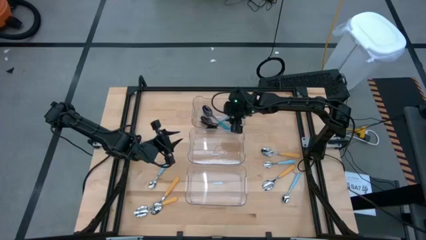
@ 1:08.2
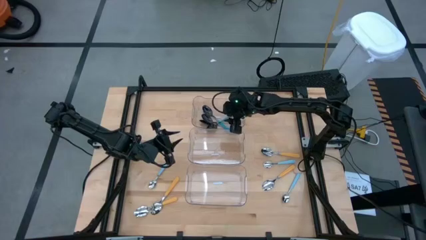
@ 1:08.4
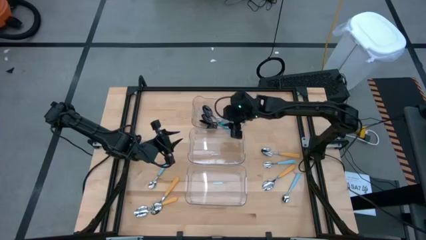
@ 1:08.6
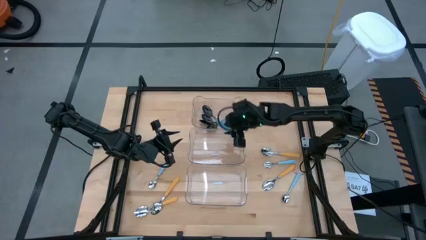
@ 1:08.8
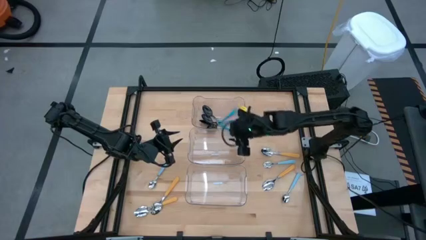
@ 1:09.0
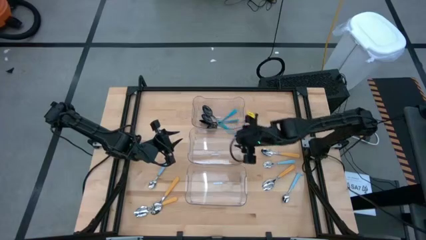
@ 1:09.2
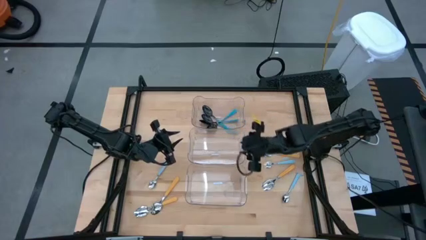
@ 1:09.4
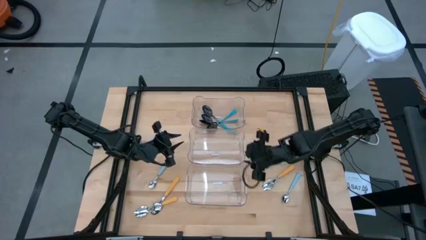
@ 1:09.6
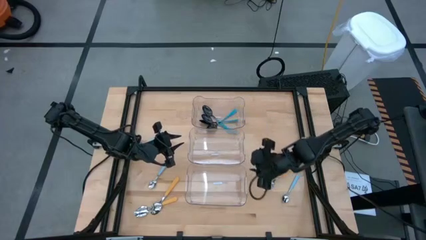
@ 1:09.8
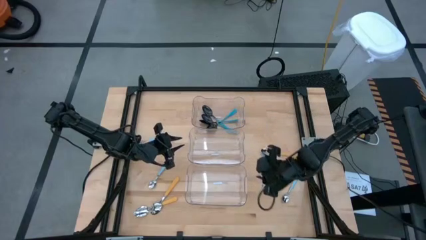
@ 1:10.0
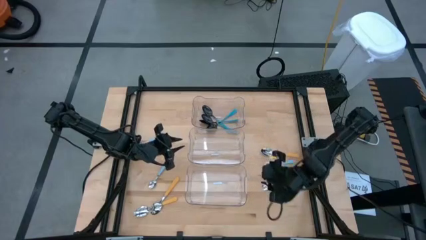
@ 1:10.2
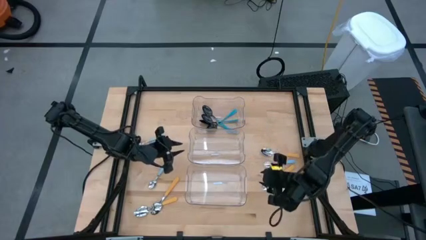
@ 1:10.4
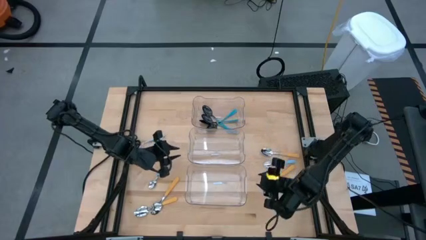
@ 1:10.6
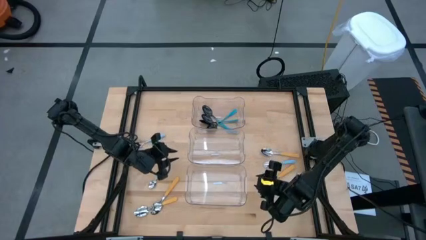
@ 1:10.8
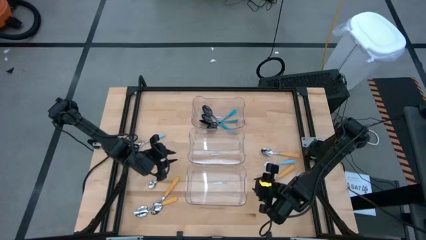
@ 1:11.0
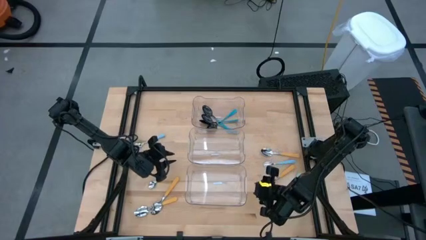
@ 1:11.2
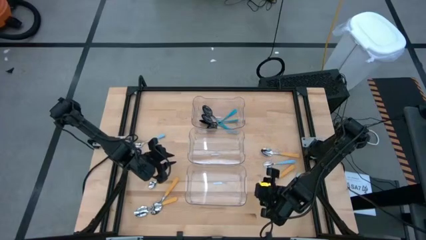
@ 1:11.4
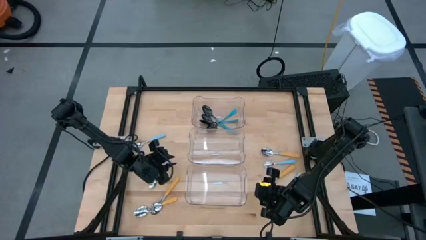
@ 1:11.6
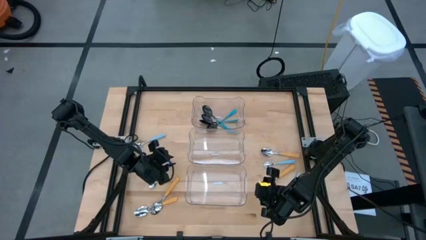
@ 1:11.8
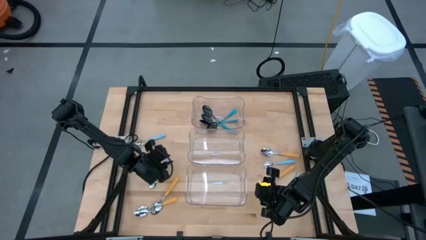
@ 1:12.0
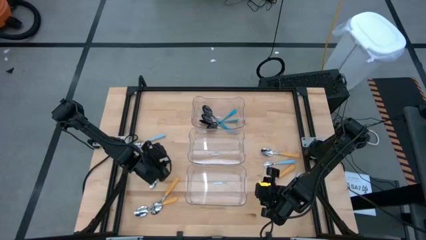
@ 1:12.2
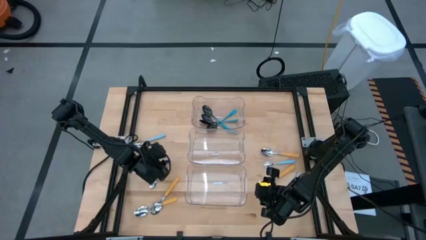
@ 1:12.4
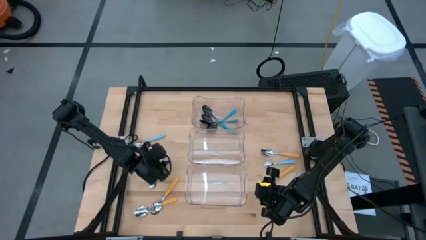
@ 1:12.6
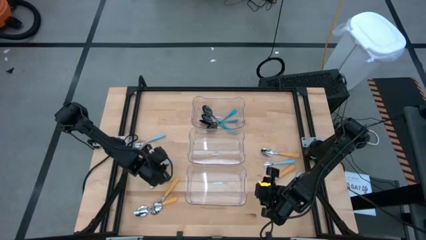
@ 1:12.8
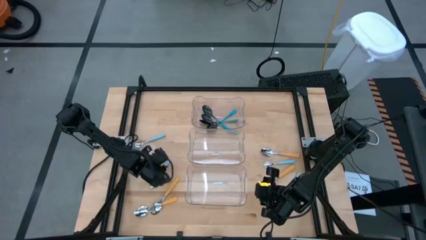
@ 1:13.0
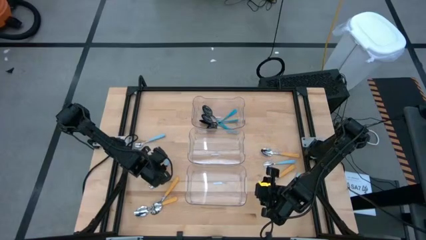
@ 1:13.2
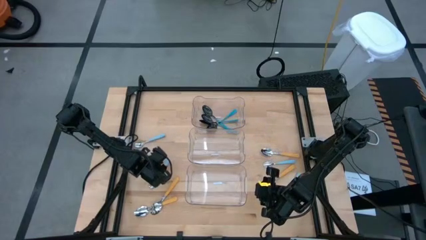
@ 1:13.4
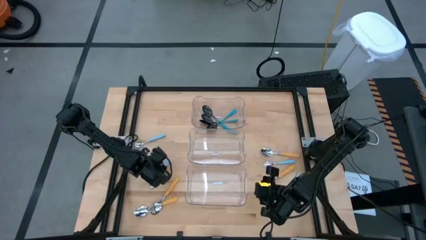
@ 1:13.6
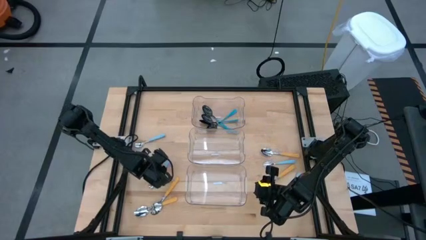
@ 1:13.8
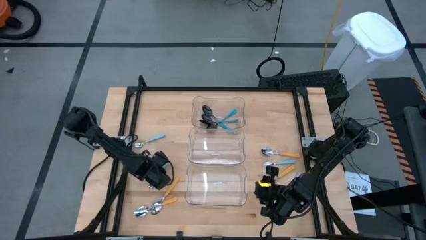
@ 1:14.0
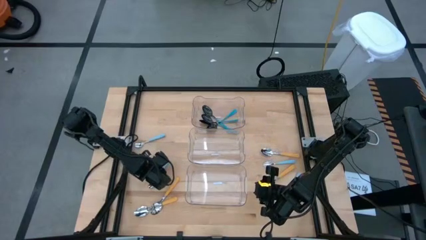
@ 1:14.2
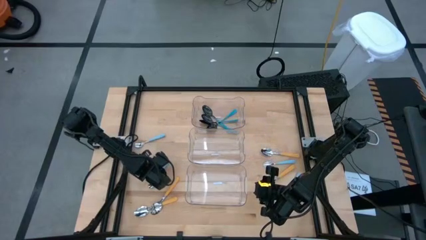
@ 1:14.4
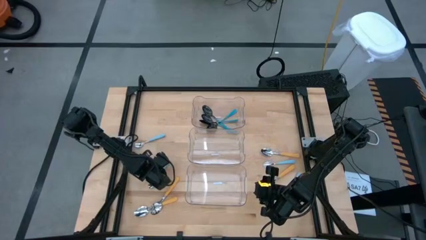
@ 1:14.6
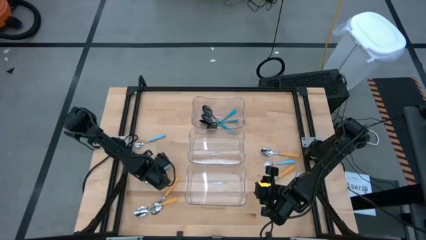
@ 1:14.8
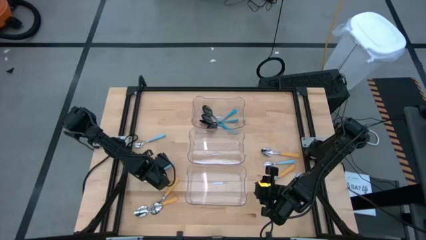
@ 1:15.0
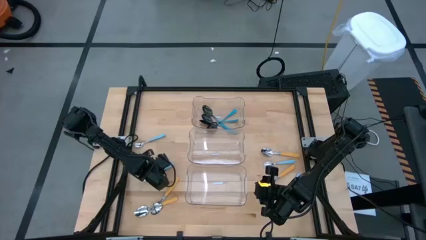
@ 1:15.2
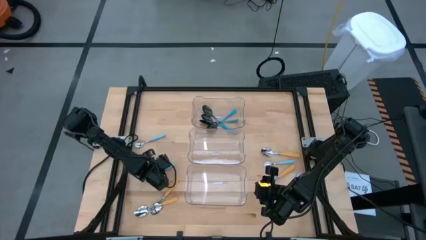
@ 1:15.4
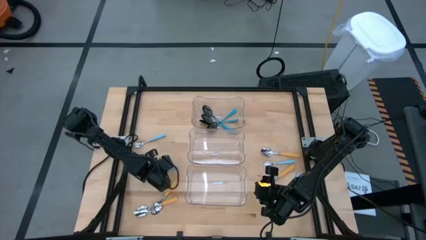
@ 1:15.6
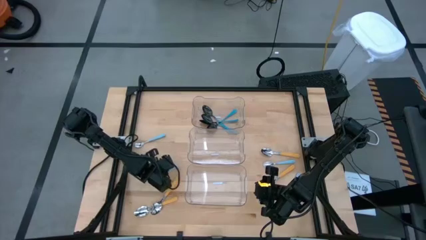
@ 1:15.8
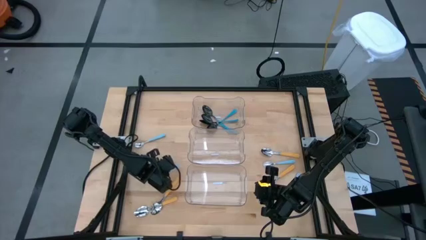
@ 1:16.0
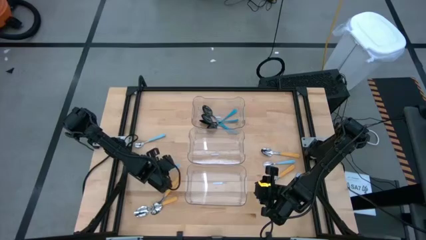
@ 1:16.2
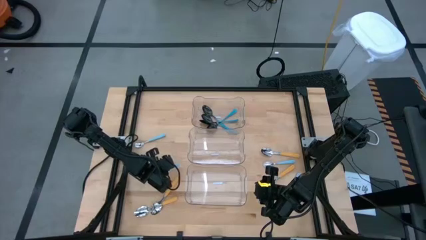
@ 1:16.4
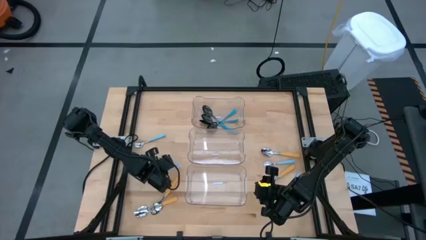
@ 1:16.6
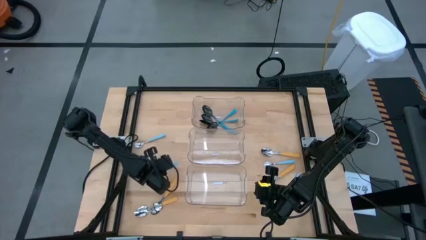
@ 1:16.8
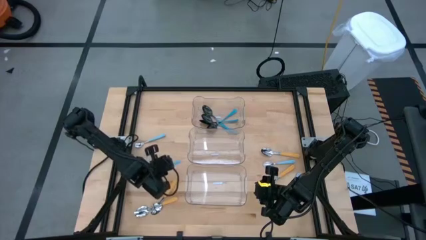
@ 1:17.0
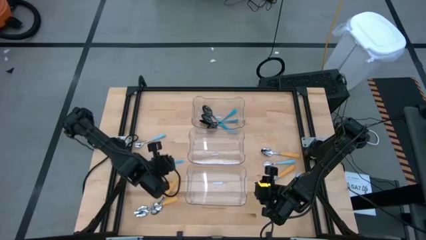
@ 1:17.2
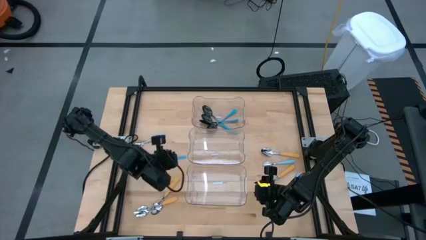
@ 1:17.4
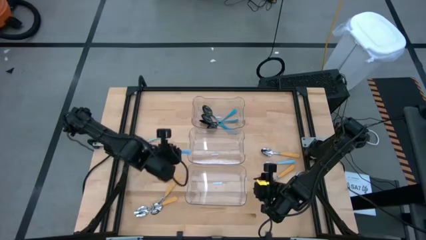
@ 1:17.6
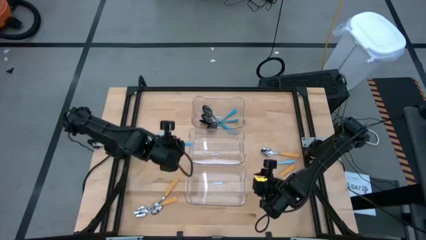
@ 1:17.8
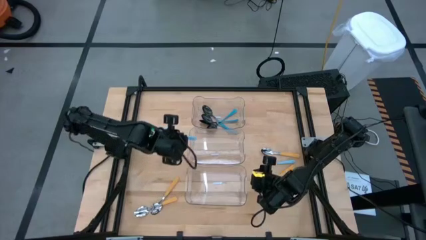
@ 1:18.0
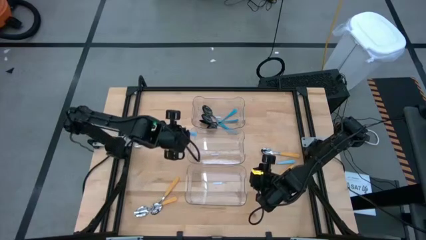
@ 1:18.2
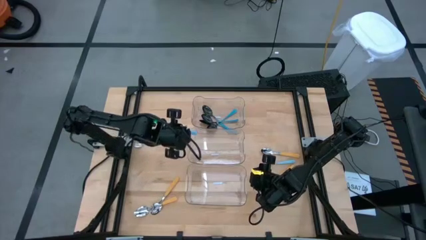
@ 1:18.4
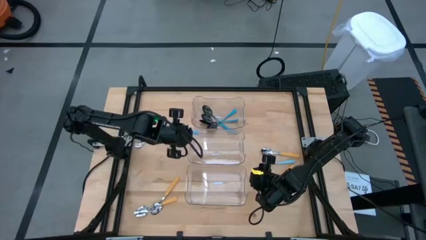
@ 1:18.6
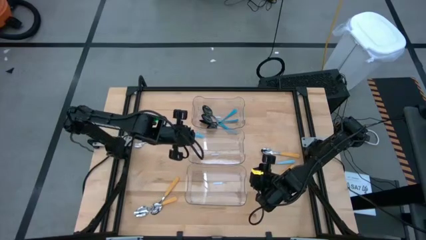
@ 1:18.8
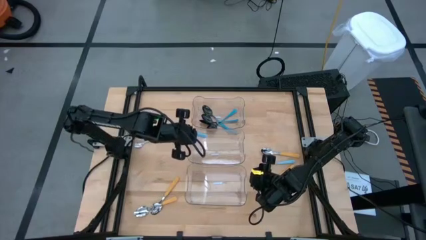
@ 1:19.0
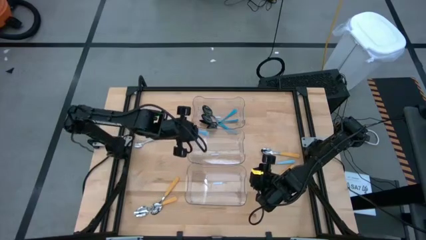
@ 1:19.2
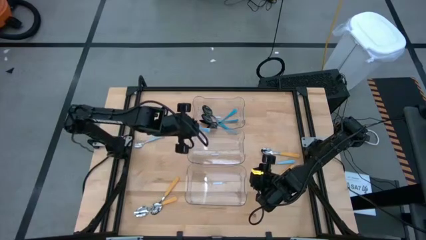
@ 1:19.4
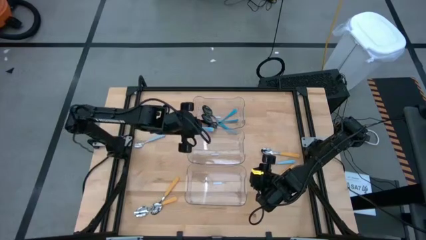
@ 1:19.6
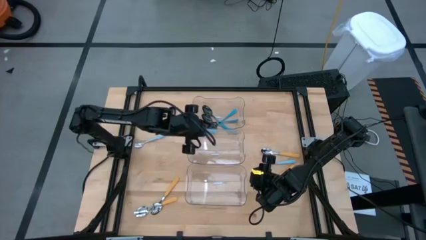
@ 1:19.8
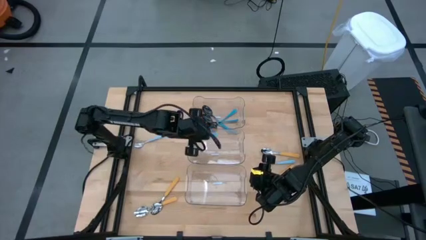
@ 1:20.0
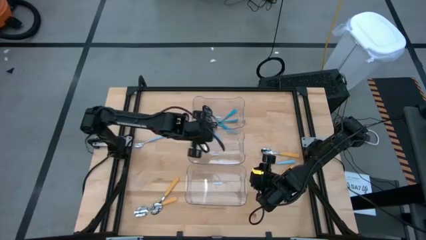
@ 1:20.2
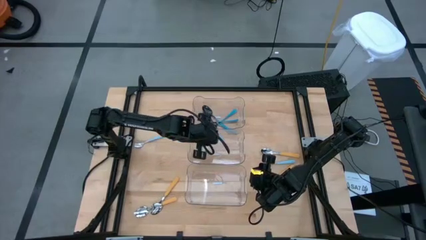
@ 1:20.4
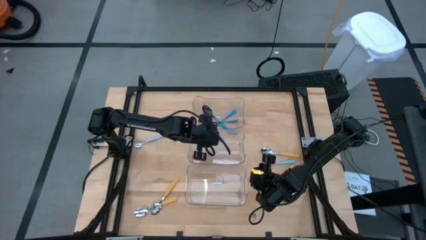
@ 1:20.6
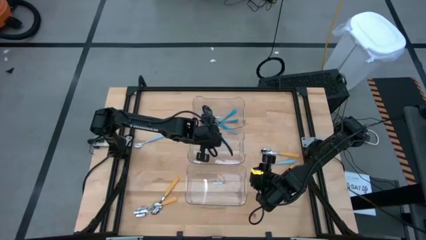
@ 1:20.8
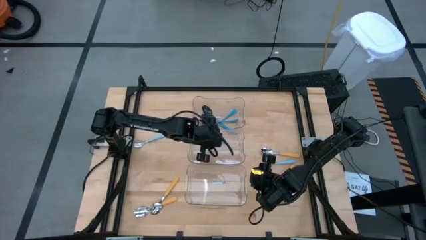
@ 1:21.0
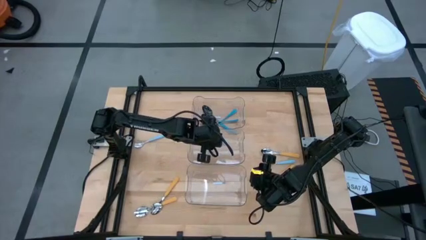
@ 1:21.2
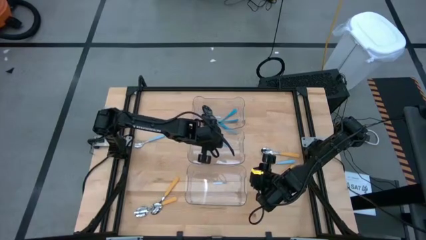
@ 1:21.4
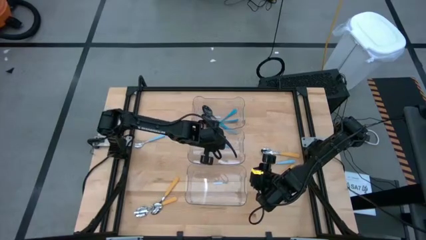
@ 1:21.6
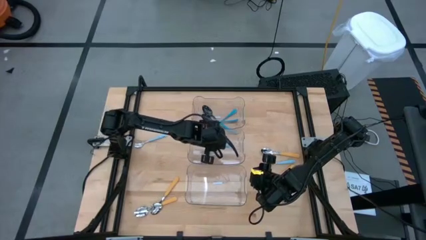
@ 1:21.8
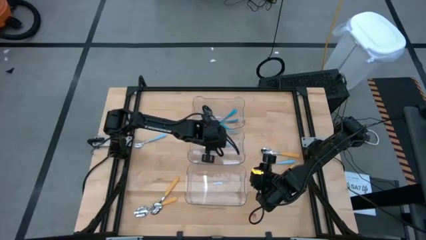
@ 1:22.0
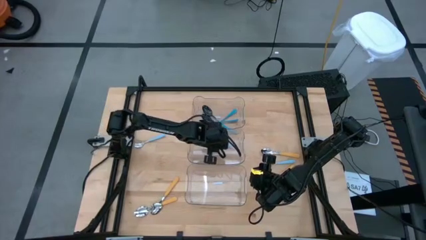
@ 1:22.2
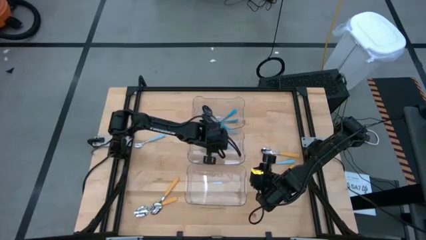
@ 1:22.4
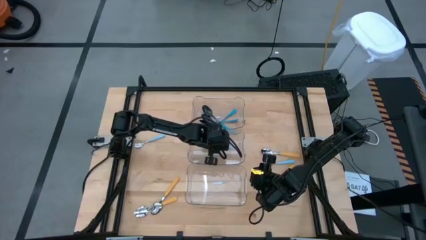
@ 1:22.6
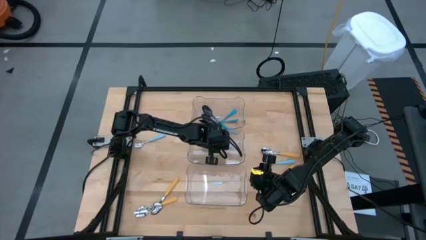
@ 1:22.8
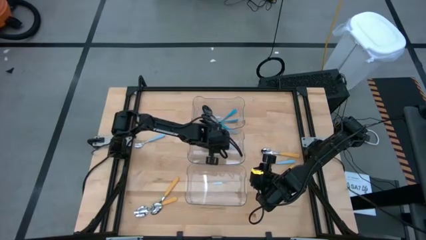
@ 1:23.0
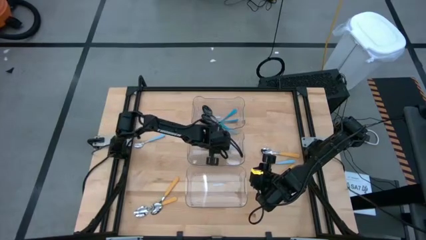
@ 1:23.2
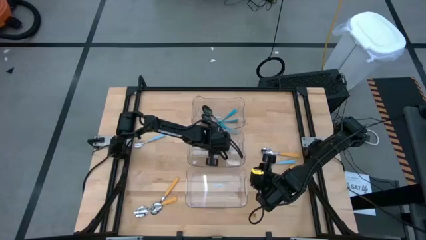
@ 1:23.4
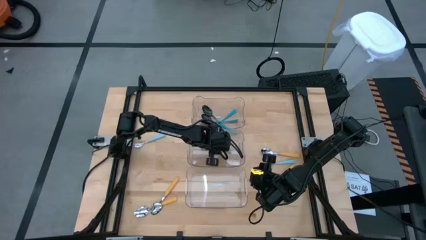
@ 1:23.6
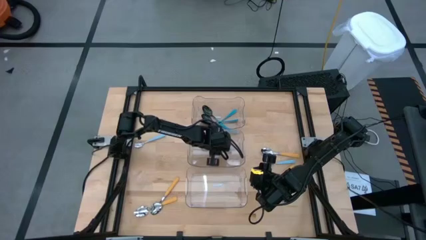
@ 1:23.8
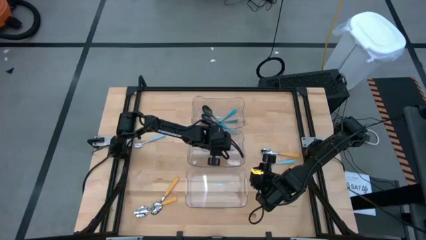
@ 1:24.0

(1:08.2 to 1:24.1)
Task: Sort silverware by color (type)
Put the light blue spoon into the middle transparent bin

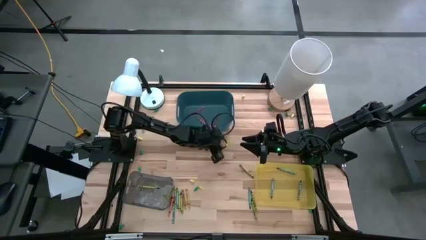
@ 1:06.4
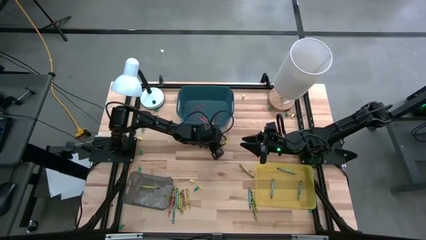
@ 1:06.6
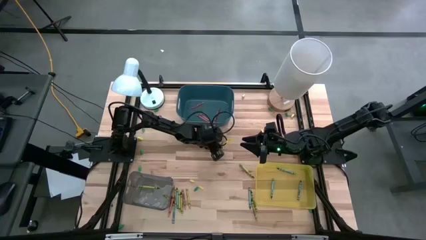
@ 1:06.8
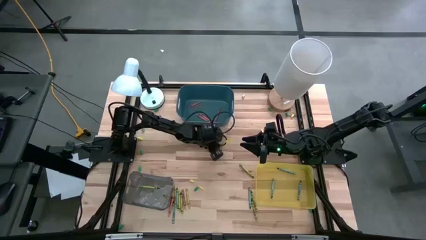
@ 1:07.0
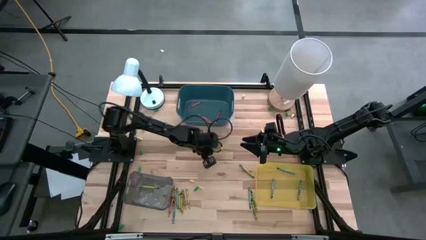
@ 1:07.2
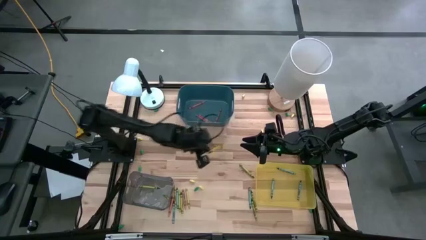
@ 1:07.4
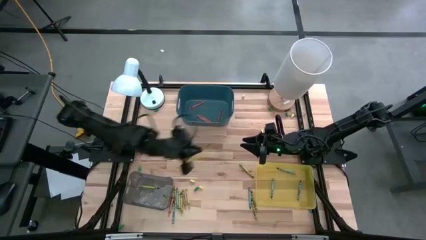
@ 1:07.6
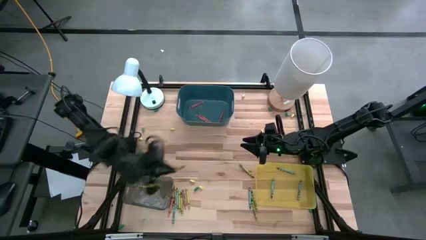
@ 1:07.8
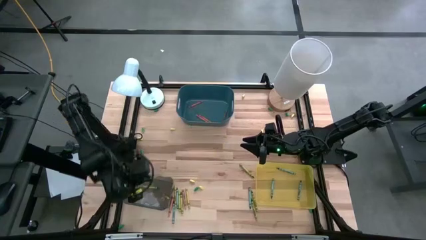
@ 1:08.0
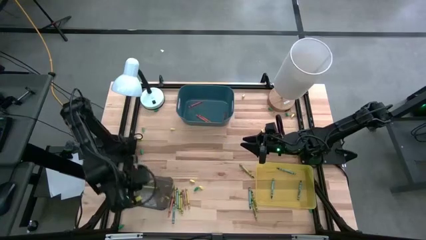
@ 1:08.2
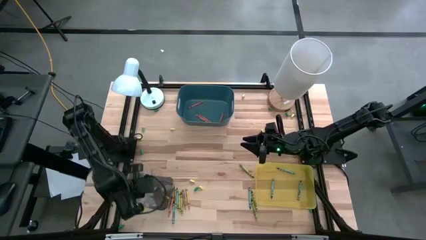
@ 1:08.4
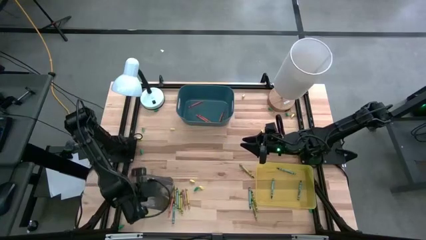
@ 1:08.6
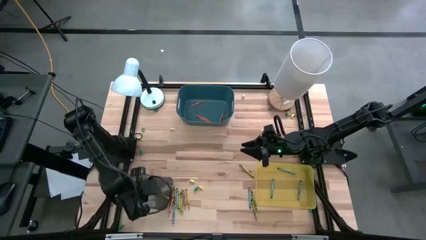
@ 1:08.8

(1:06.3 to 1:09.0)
Task: Sort crayons
Put the yellow crayon into the gray bin
